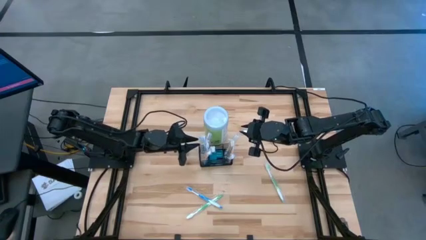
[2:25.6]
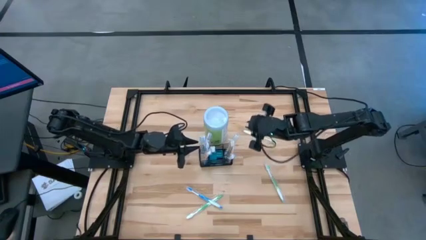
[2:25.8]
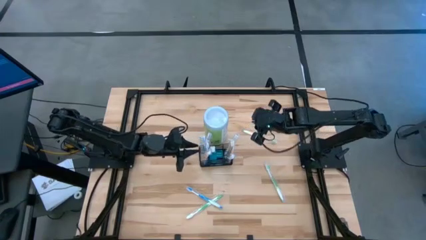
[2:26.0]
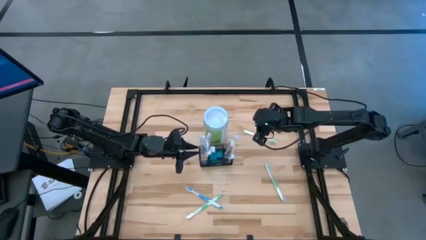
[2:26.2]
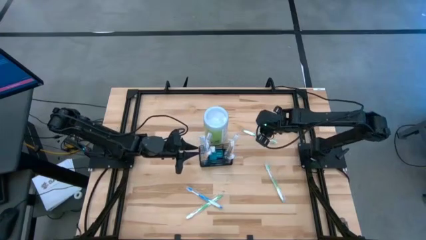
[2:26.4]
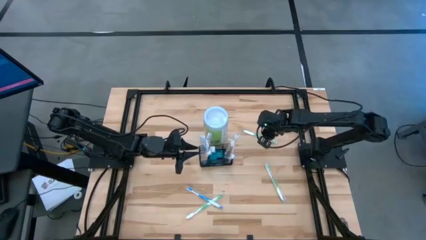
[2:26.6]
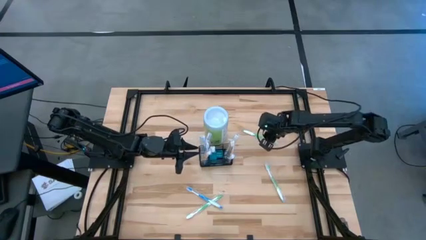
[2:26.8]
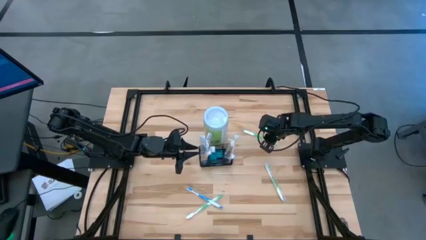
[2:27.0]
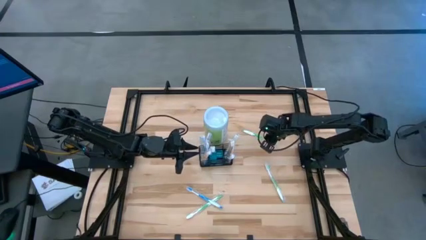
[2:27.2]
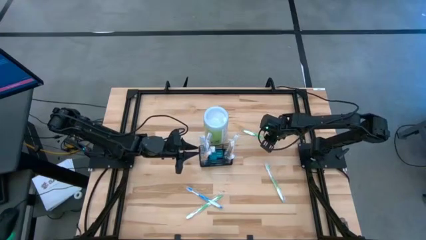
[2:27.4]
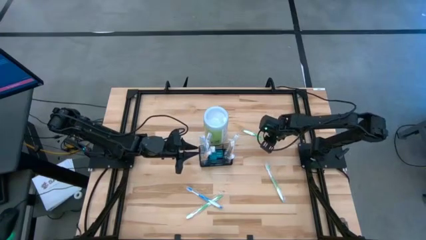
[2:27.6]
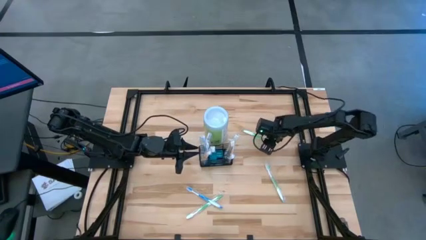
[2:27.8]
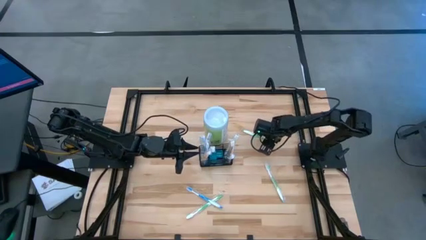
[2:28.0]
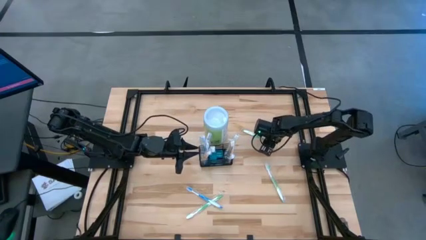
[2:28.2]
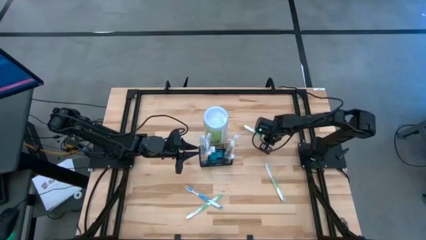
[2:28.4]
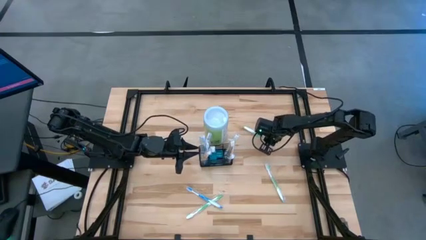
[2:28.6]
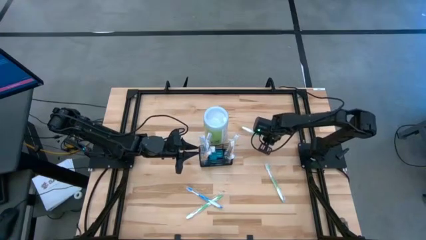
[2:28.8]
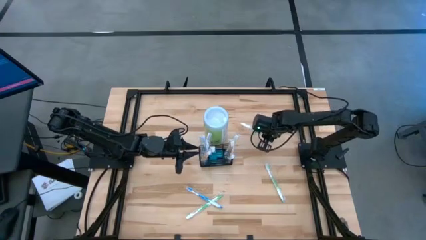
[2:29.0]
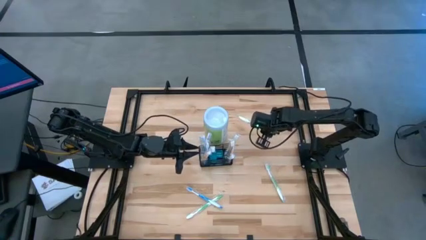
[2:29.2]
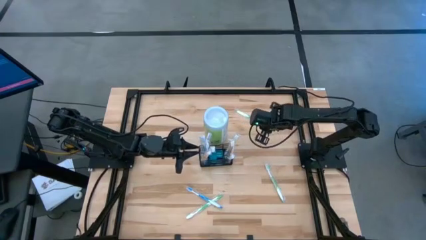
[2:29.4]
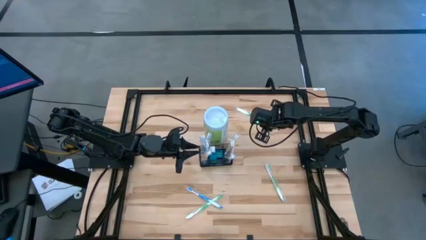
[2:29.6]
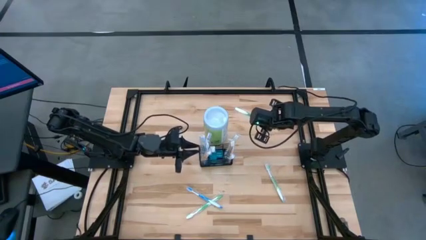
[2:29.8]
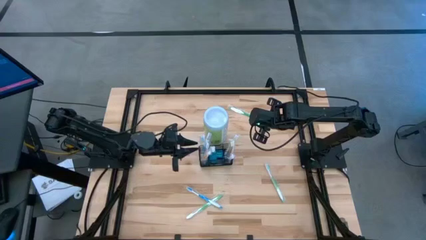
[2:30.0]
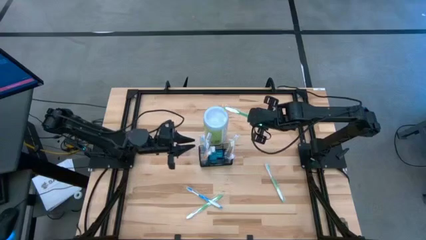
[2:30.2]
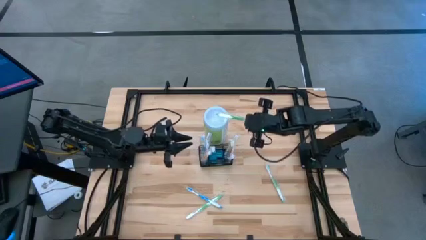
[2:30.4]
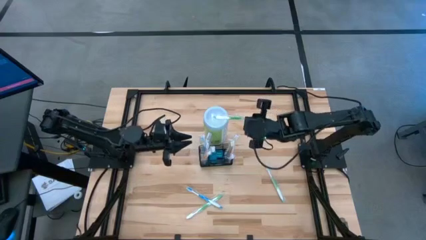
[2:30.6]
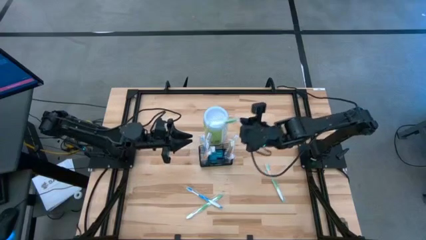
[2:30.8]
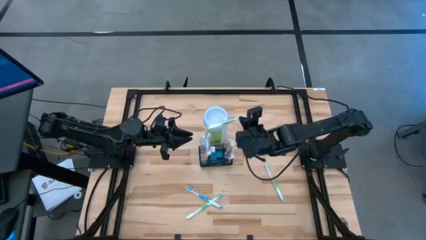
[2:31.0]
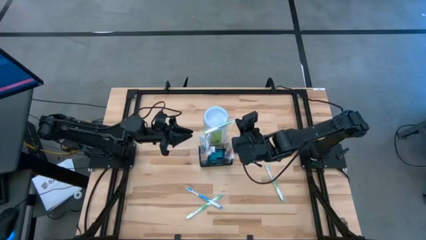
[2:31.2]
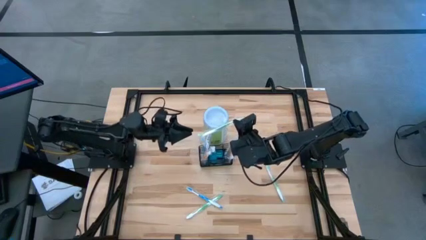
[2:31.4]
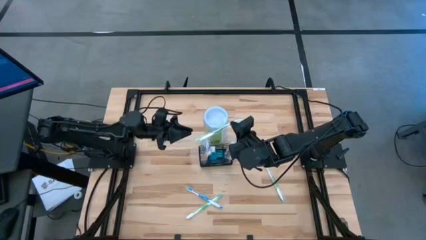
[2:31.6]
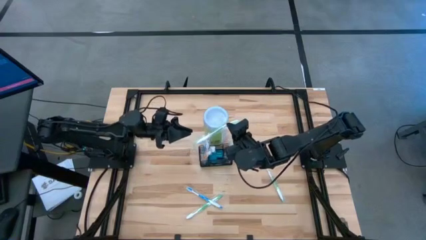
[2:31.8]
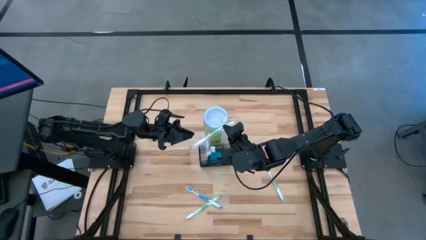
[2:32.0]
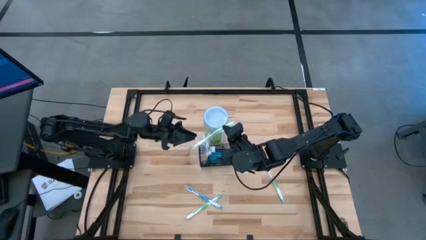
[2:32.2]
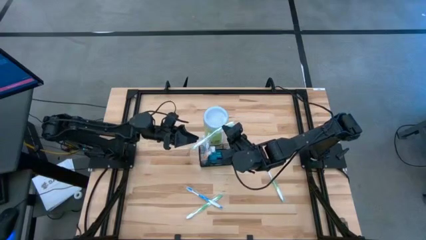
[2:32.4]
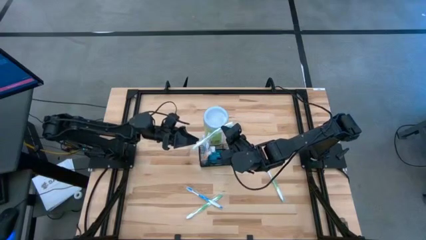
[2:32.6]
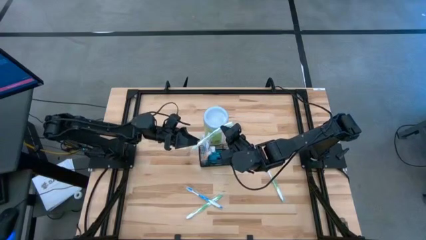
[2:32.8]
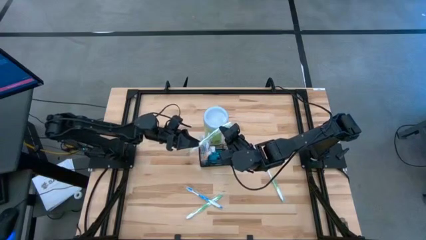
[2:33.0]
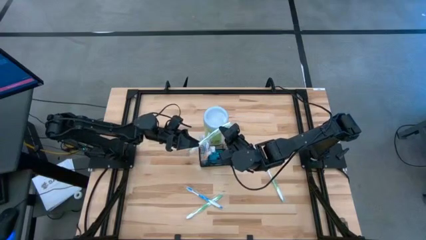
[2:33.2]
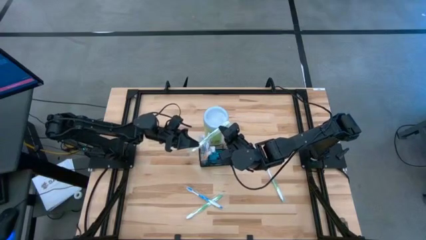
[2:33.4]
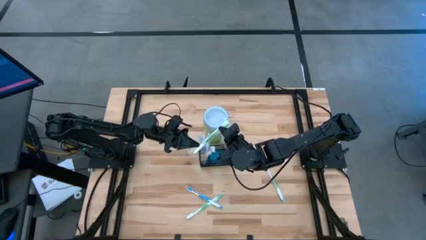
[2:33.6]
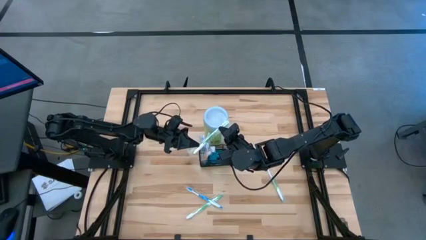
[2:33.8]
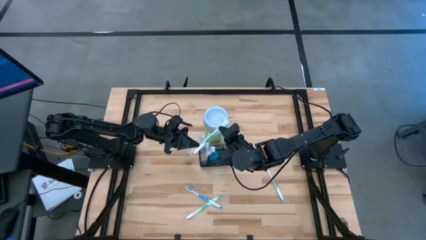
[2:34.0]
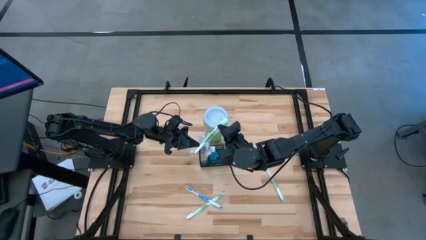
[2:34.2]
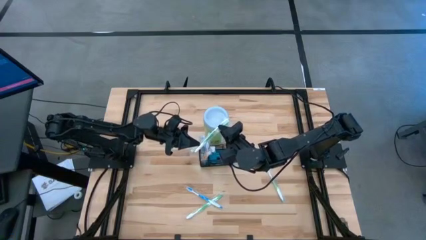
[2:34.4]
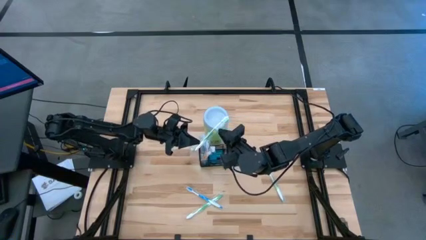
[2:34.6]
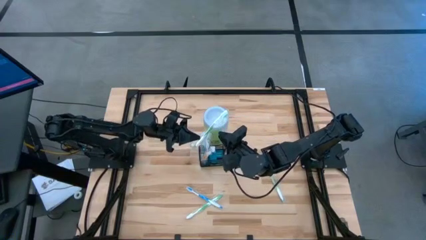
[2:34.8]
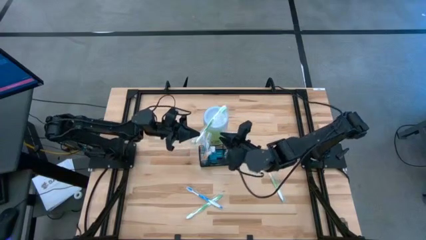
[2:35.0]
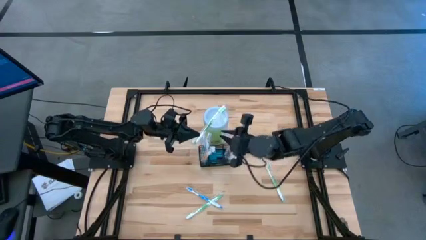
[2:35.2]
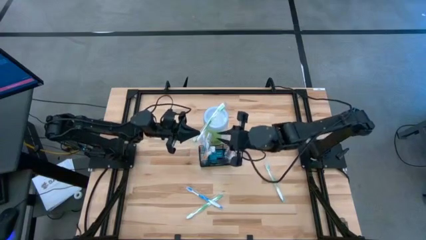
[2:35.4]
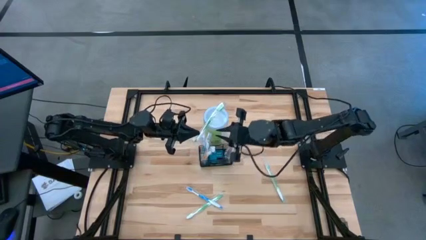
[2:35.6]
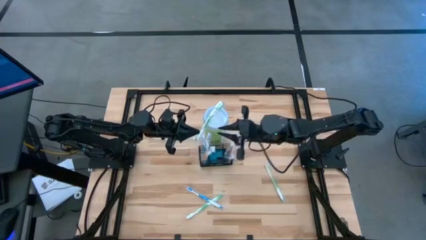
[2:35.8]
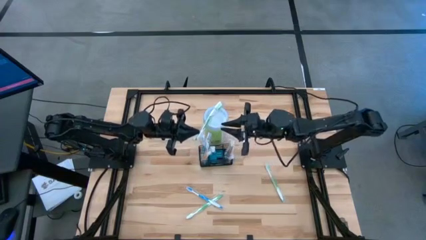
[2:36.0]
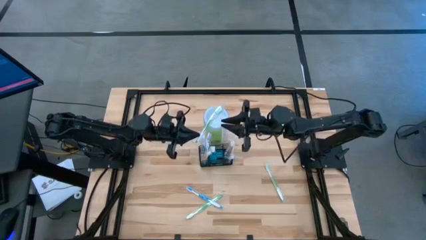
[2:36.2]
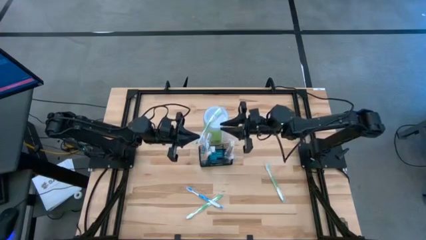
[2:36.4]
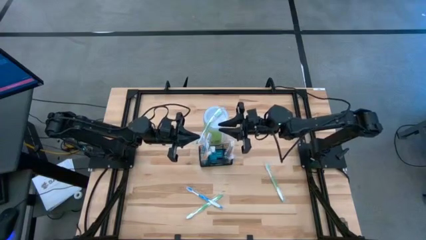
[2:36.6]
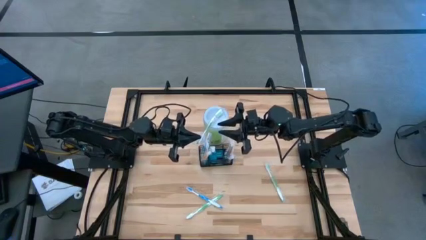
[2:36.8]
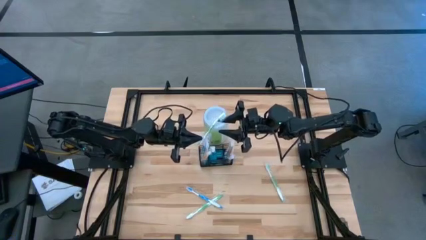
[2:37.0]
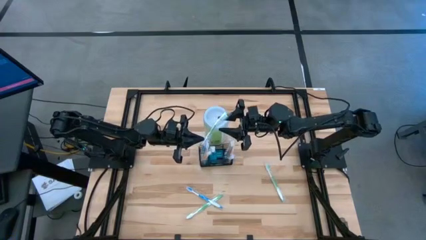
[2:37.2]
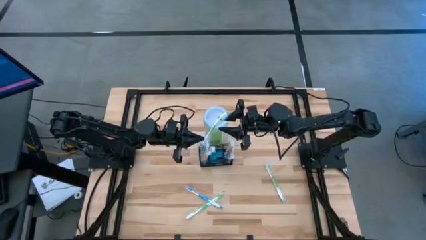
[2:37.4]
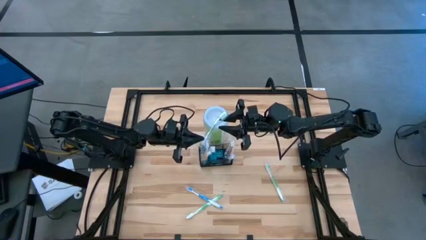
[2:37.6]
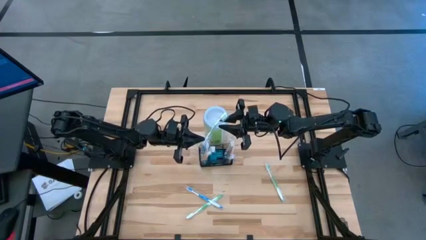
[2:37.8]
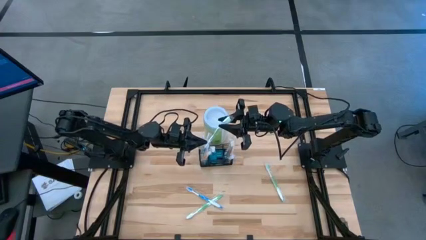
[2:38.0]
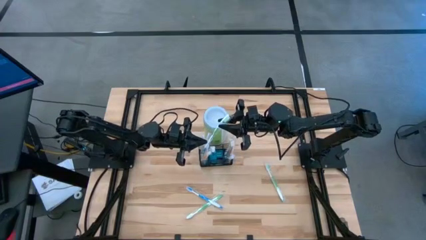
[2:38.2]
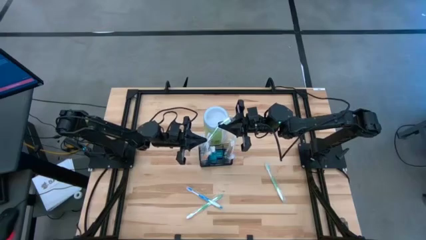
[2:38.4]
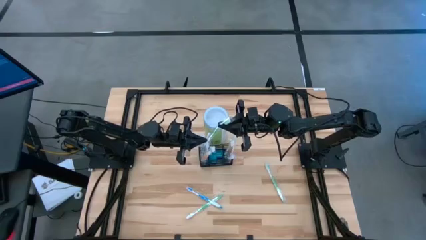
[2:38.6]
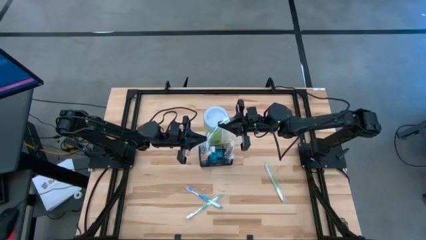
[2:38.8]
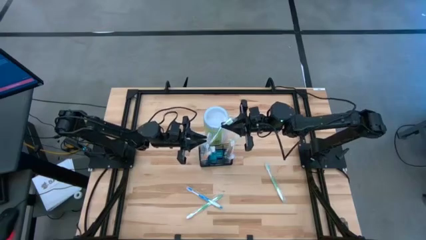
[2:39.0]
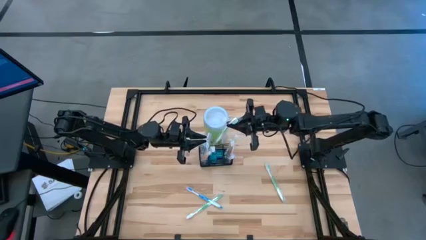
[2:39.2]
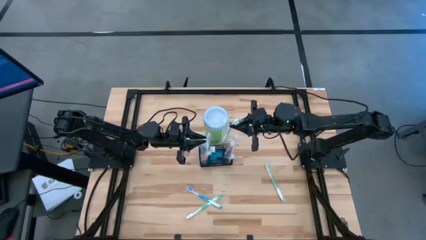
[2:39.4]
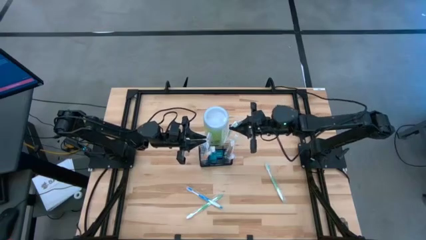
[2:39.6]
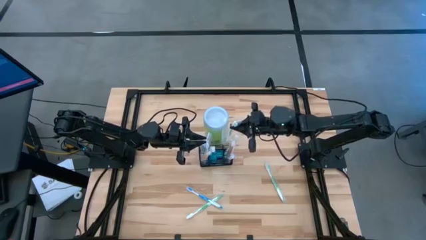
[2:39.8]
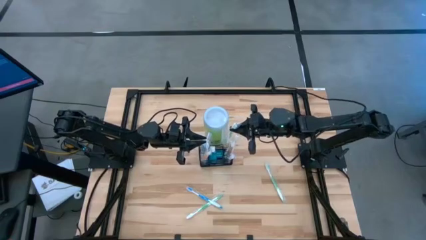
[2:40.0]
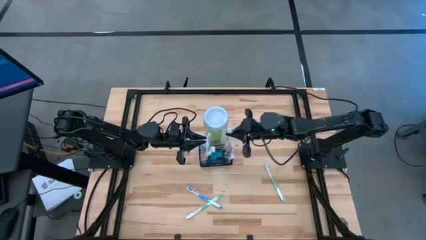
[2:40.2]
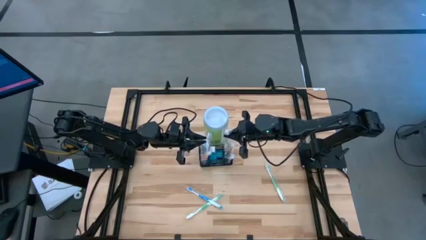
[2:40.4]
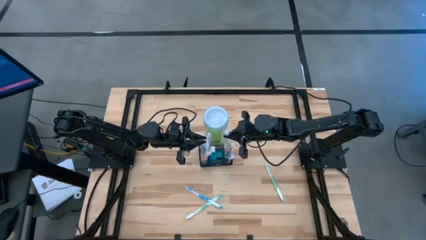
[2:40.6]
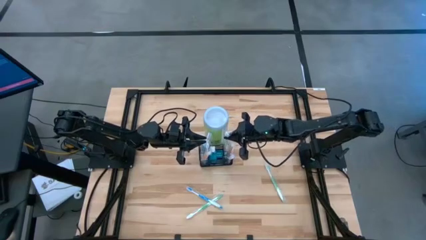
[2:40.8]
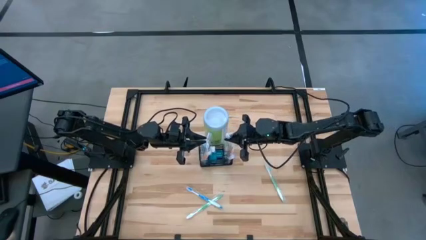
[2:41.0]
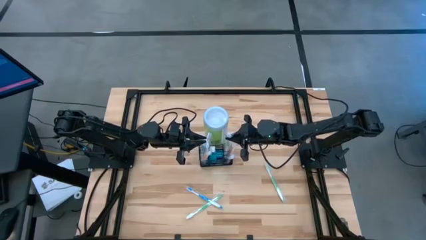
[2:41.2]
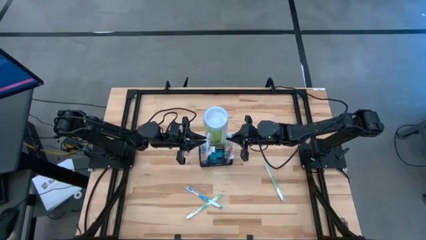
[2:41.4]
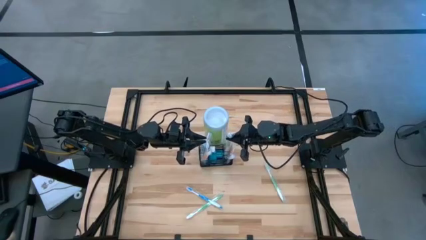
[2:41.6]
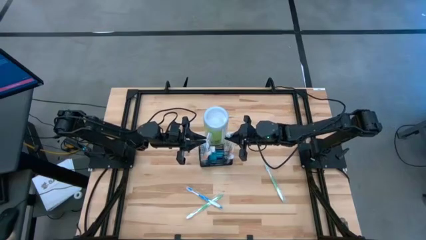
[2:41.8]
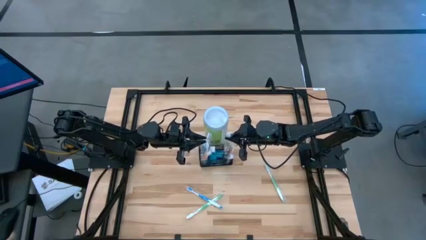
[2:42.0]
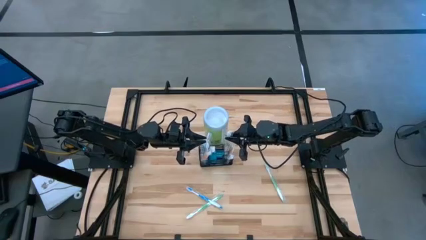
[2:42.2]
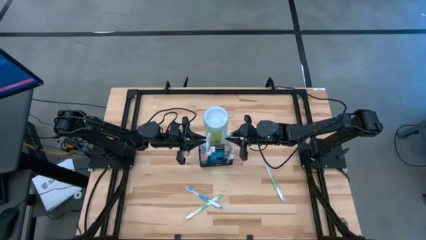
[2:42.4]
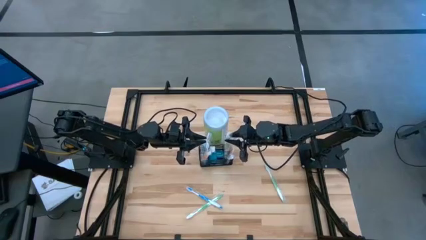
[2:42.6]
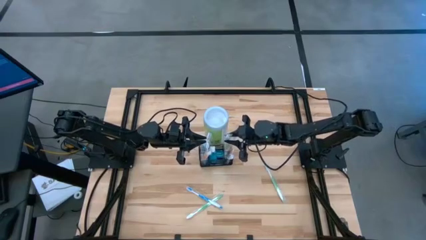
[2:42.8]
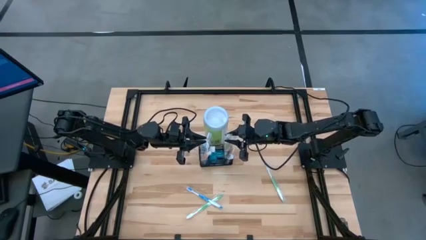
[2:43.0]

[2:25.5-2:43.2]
Task: Pick & Place toothbrushing station
Put the top right green toothbrush into the wire organizer
